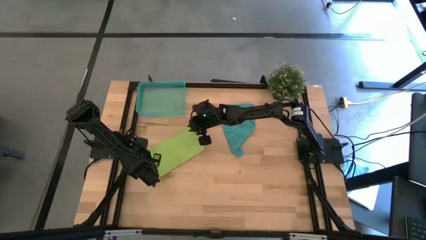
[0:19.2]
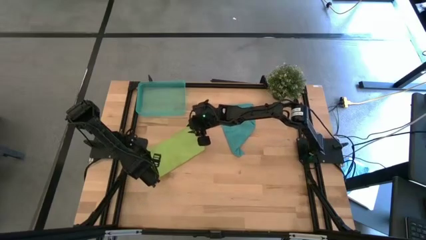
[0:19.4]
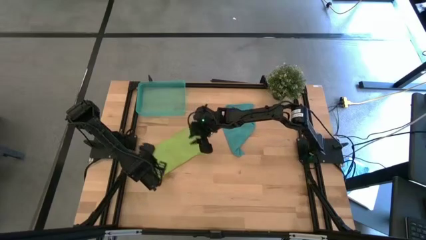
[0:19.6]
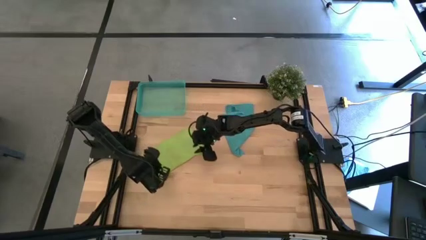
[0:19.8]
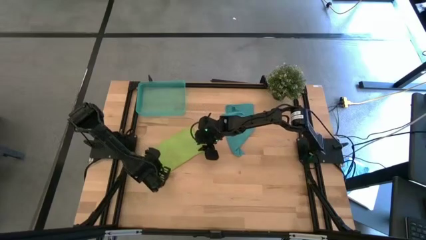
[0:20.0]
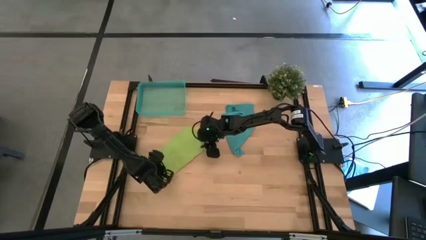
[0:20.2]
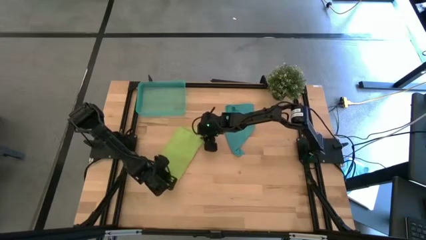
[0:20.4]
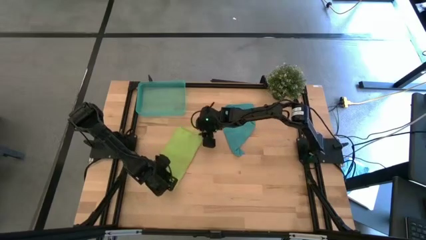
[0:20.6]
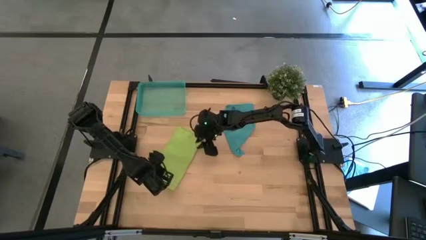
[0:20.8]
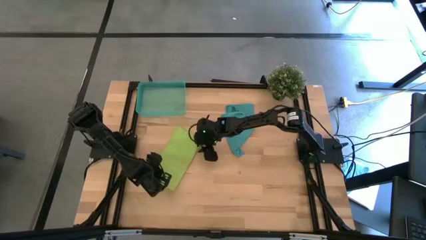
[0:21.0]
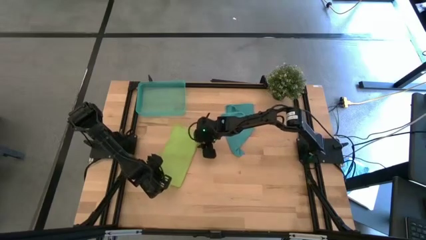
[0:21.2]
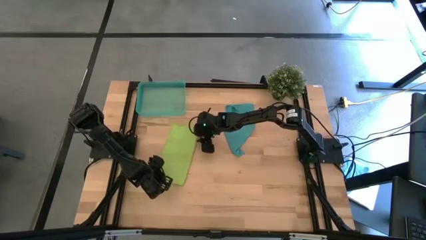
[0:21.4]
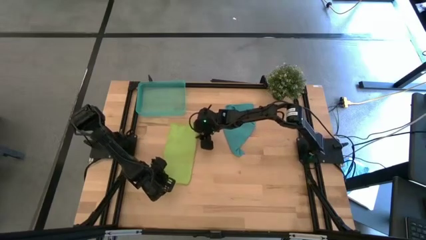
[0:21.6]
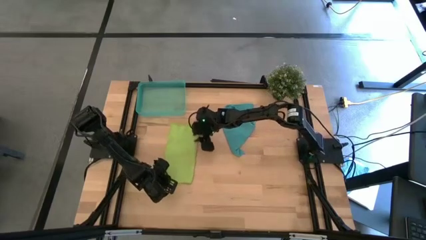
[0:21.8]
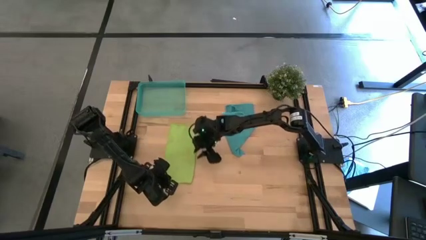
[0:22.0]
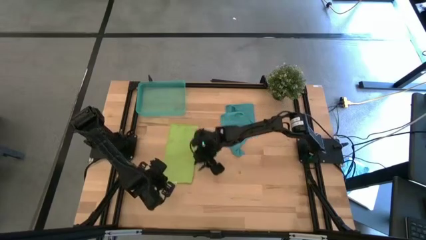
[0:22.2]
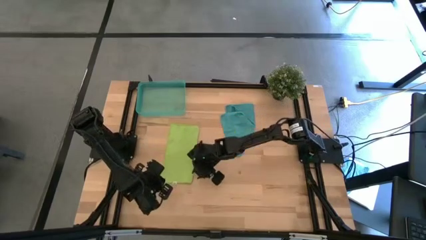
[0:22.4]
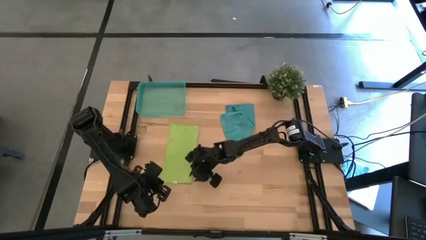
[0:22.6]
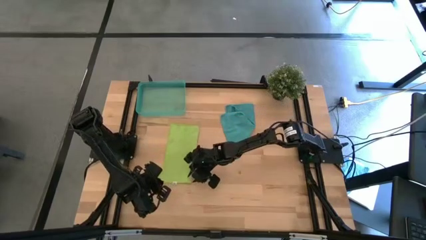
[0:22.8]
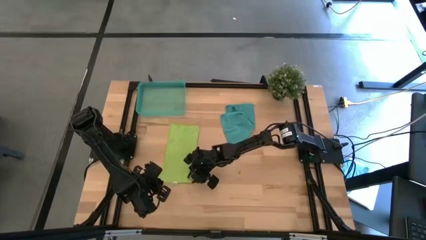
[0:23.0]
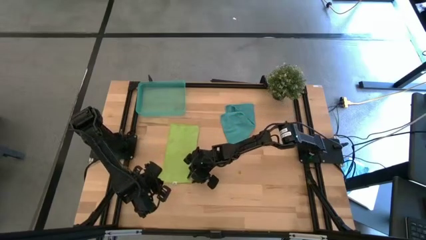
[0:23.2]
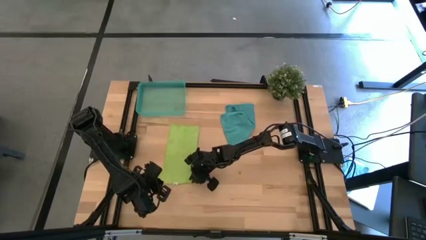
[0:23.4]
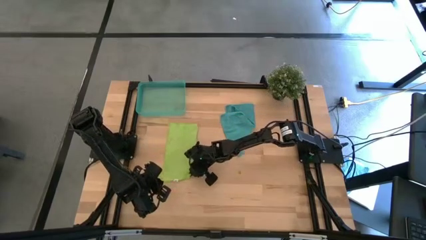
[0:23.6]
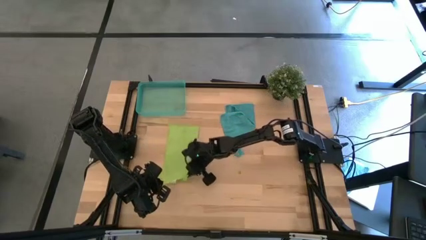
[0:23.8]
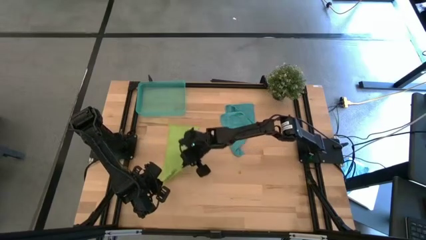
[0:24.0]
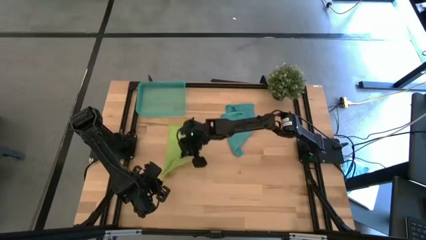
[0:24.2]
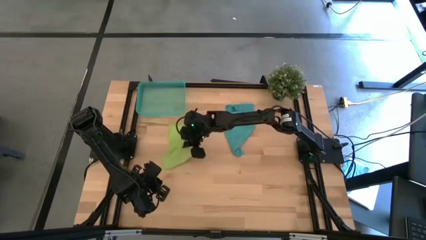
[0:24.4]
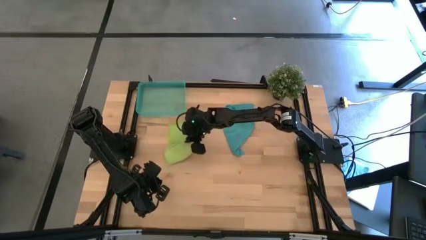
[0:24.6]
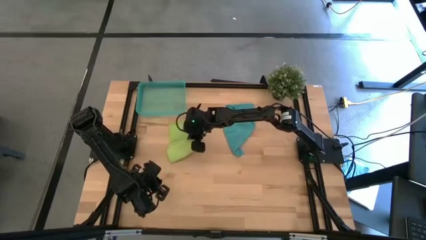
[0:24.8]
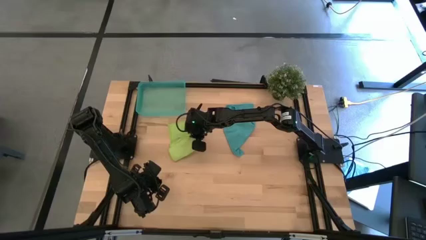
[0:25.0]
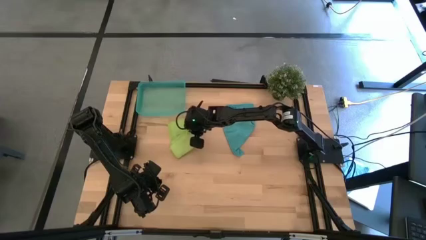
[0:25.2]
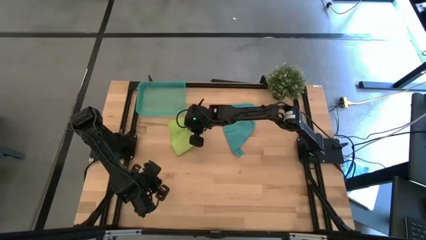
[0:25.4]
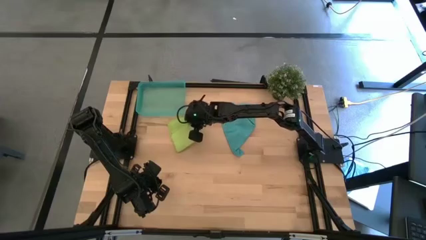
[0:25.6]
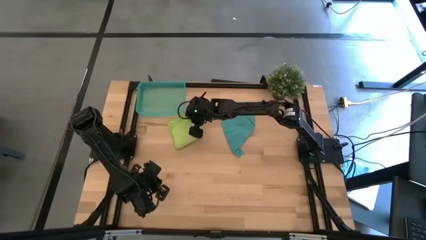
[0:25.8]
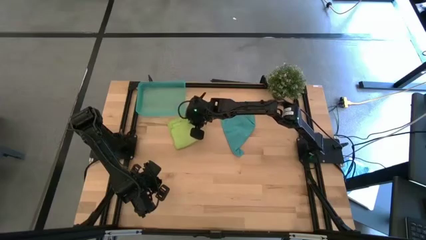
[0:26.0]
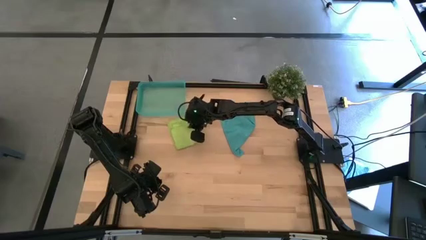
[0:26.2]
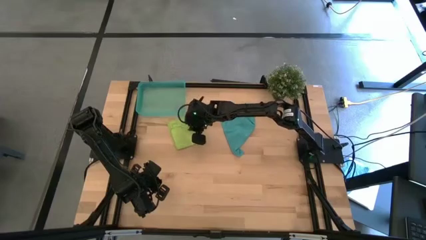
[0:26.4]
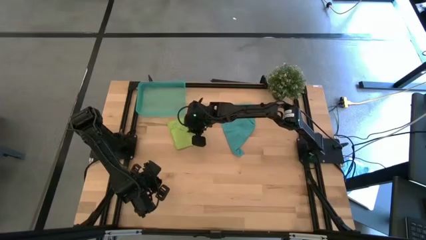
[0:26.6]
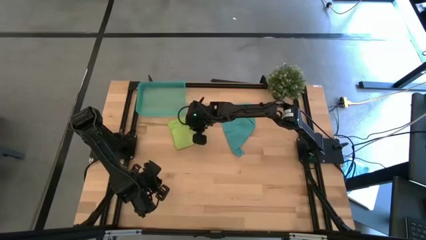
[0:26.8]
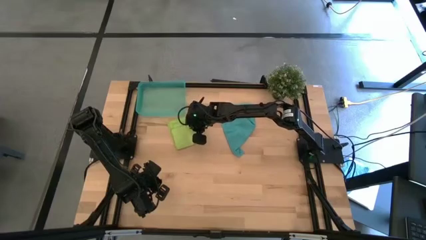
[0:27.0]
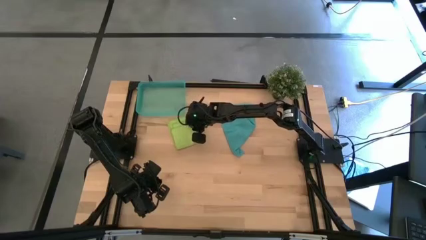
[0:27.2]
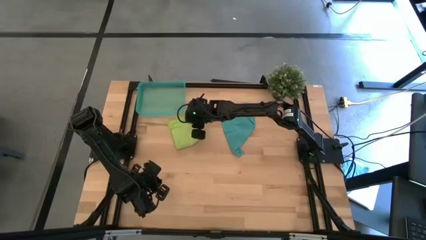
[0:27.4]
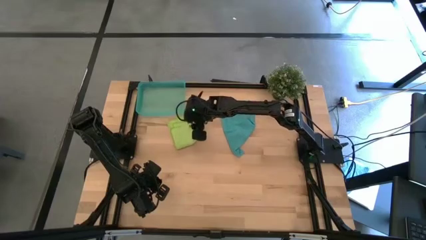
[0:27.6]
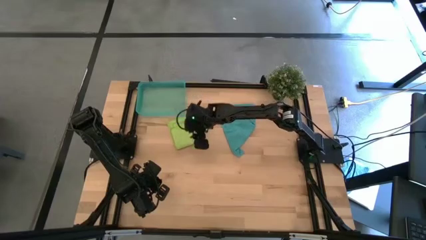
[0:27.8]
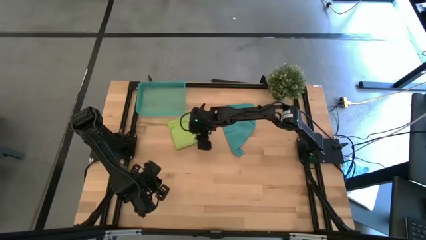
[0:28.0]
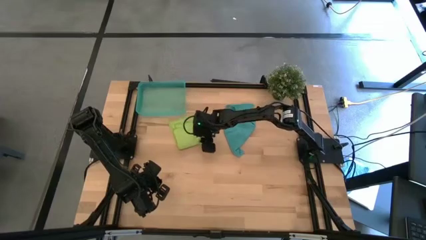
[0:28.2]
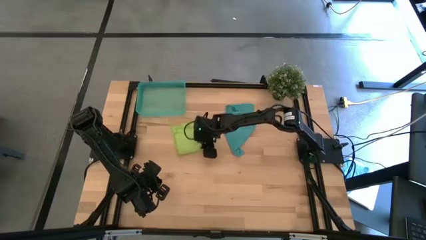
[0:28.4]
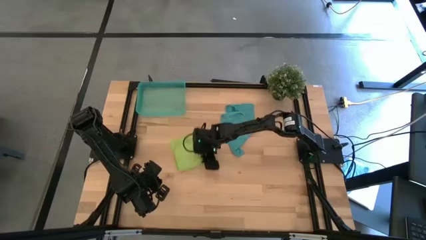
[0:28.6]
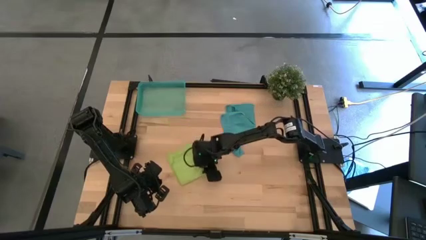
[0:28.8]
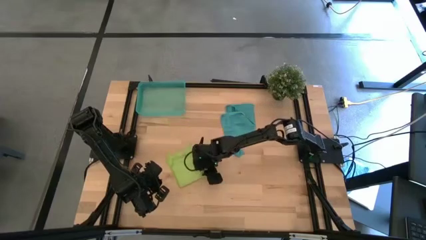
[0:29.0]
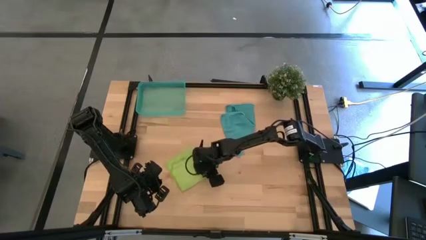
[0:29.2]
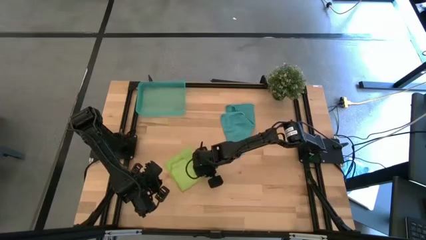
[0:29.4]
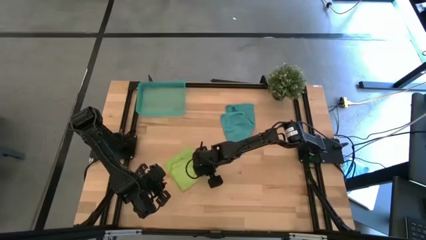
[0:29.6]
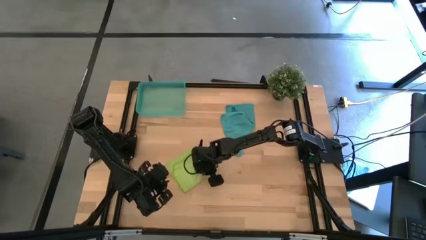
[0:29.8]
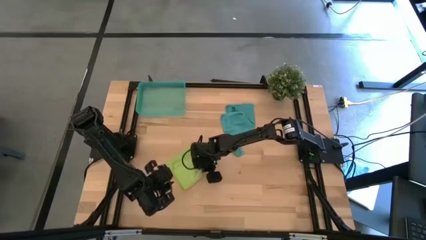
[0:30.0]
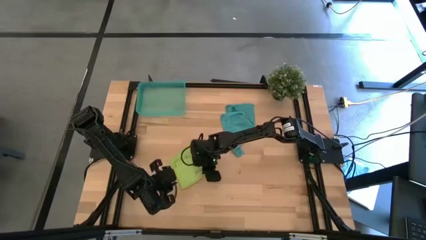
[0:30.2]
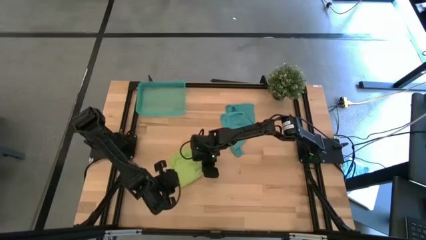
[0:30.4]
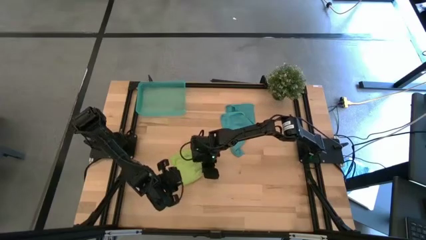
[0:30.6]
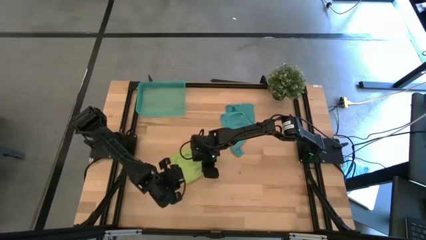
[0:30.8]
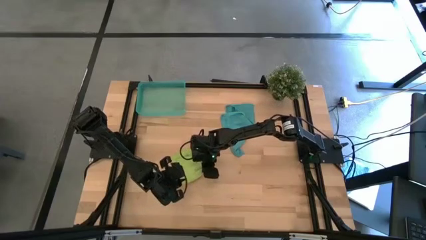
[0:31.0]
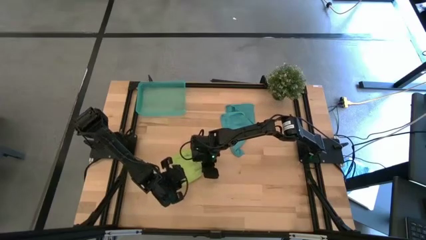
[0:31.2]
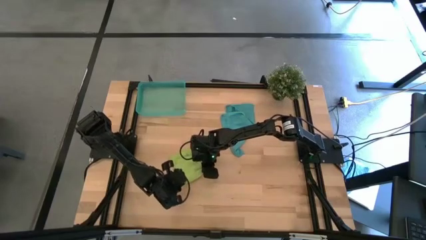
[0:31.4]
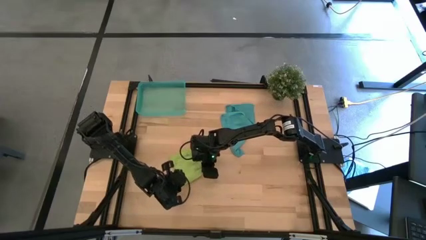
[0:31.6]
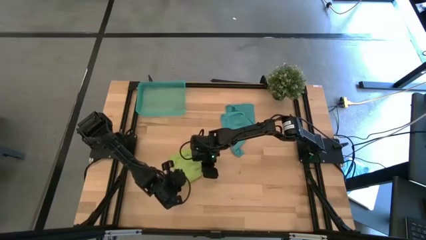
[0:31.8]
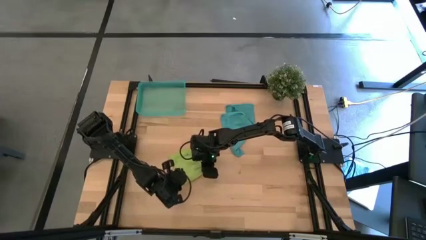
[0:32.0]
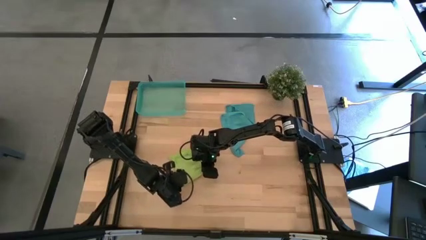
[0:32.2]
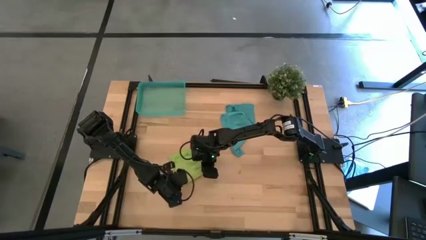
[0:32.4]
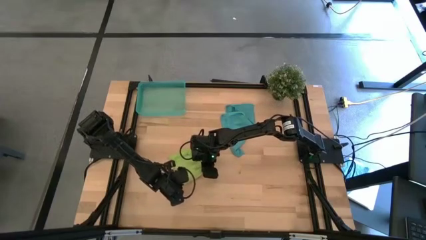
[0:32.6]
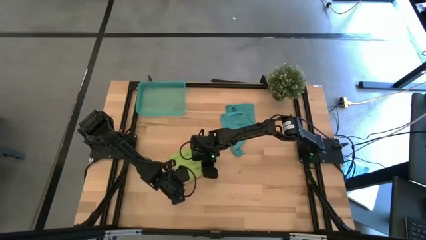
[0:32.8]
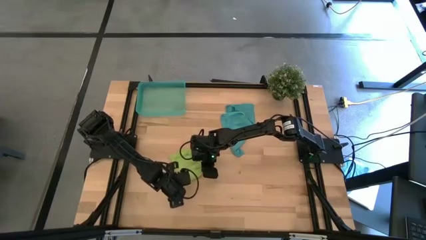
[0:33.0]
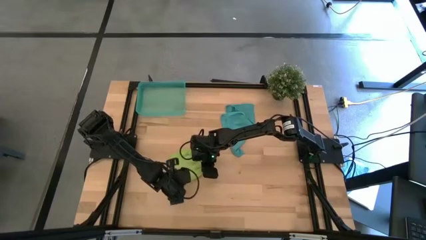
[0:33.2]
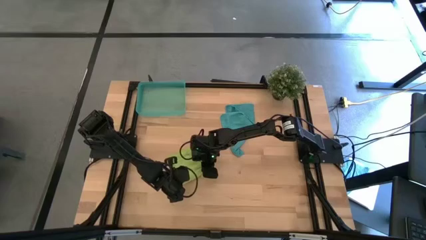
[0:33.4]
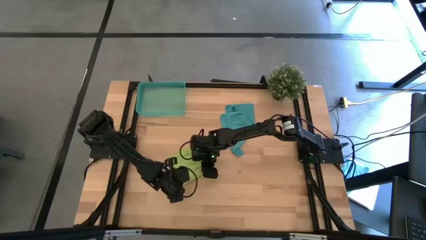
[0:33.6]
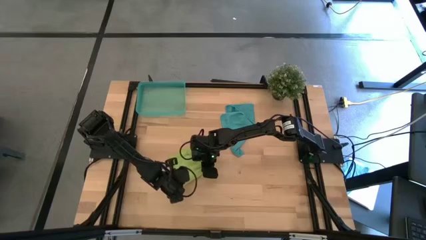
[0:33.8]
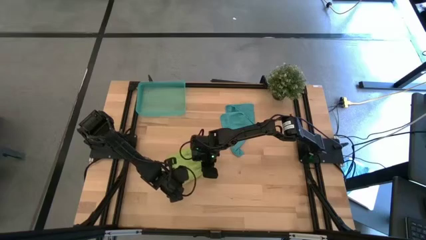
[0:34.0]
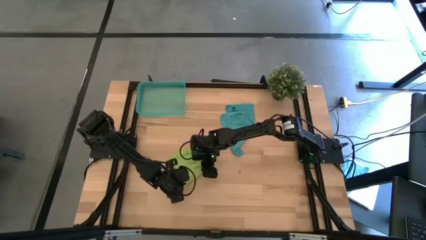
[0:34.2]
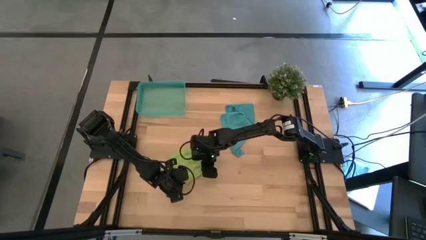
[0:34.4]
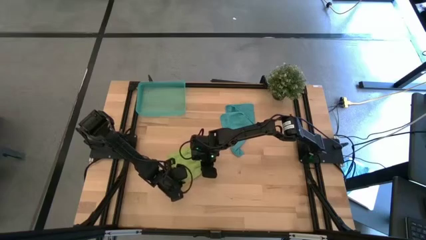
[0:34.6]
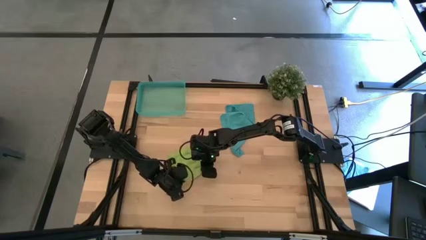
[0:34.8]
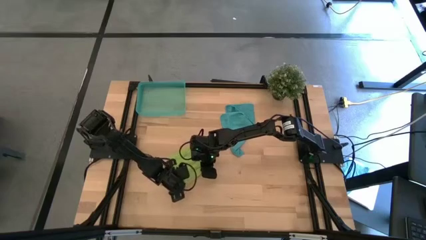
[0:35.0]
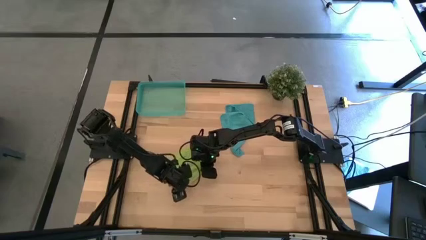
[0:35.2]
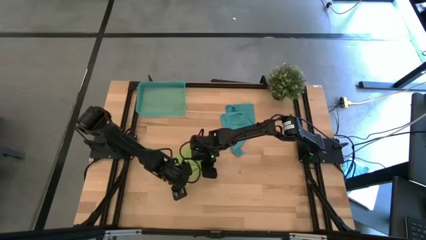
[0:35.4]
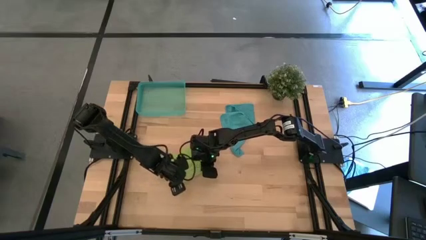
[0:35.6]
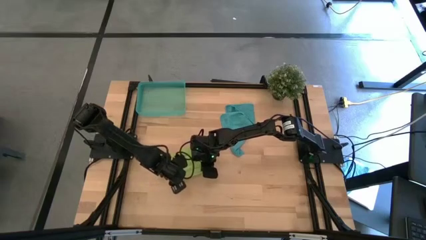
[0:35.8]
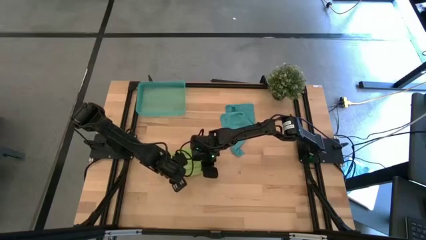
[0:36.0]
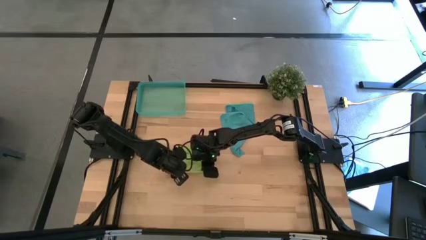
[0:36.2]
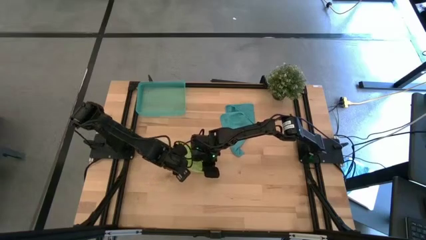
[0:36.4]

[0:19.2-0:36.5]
Task: Roll microfiber towels into tight, uniform cylinder then place into a basket
Roll the green microfiber cloth
